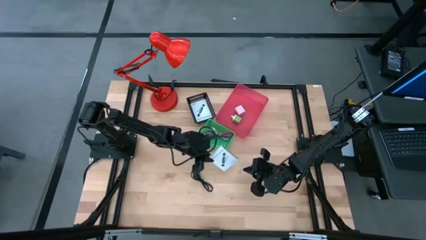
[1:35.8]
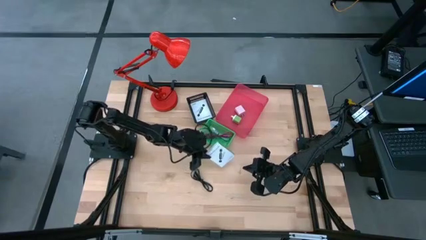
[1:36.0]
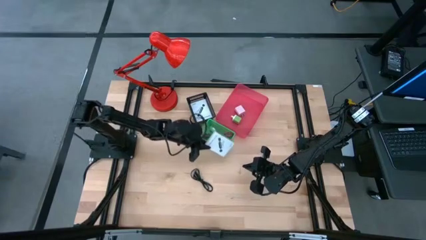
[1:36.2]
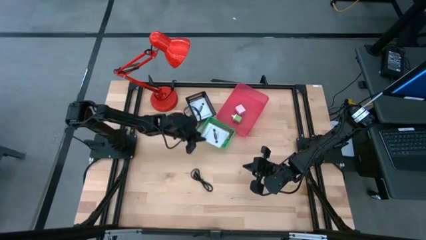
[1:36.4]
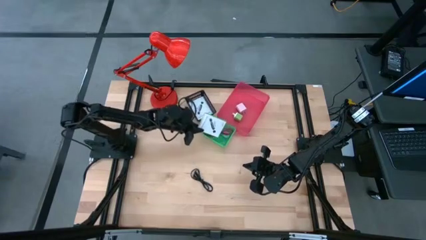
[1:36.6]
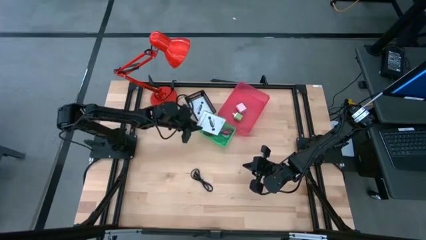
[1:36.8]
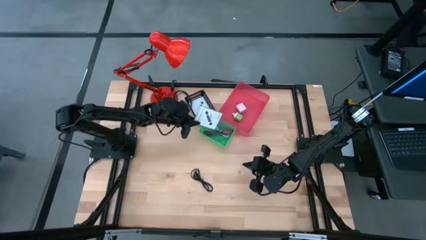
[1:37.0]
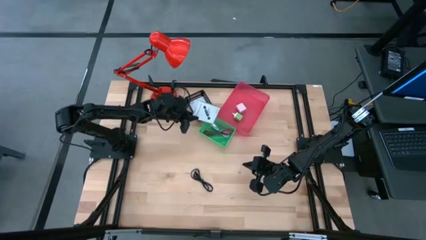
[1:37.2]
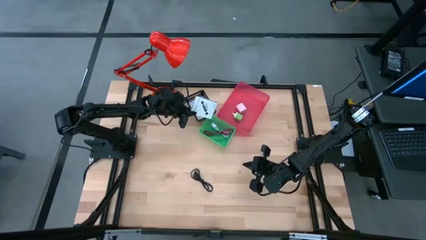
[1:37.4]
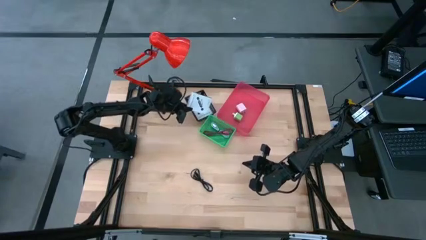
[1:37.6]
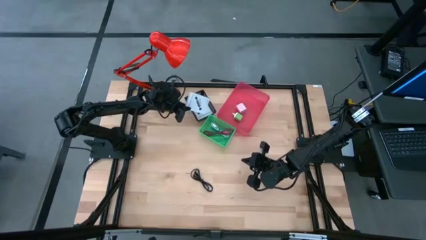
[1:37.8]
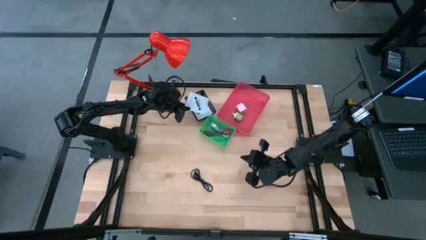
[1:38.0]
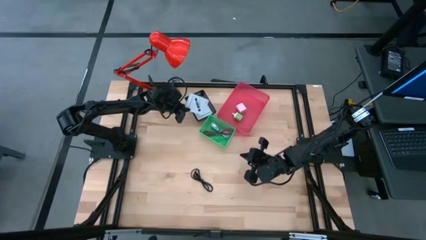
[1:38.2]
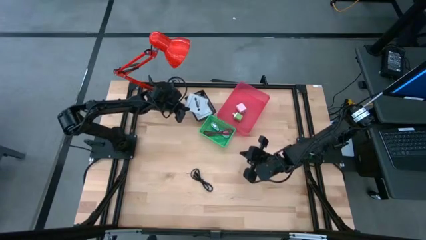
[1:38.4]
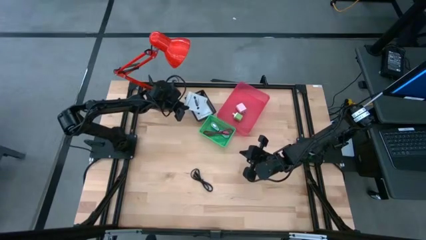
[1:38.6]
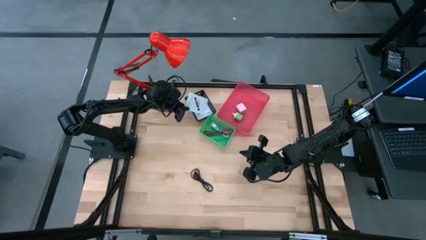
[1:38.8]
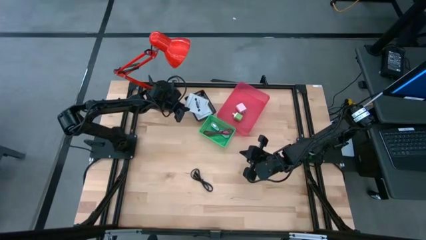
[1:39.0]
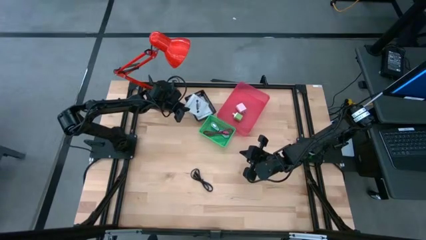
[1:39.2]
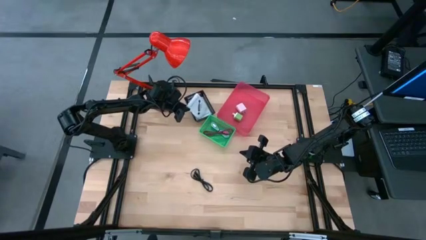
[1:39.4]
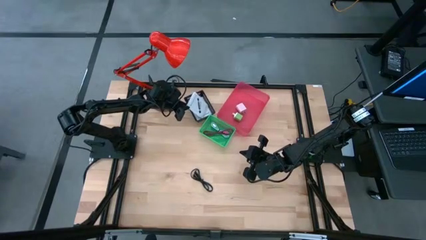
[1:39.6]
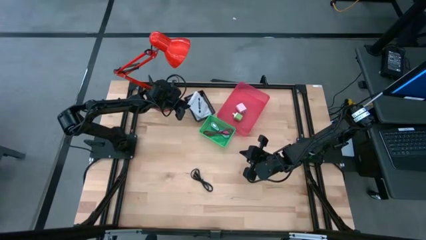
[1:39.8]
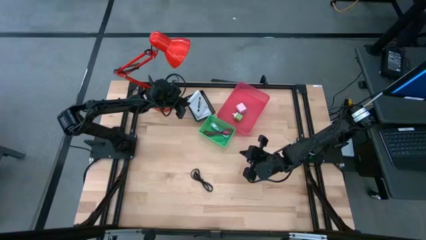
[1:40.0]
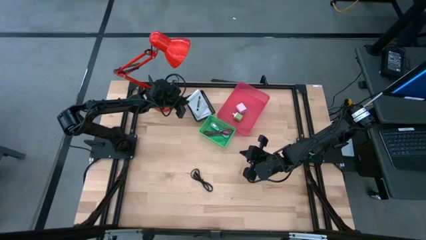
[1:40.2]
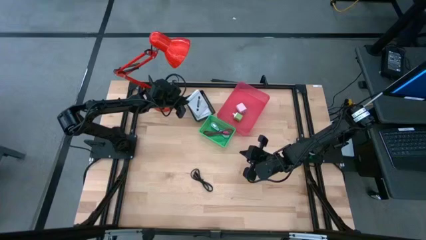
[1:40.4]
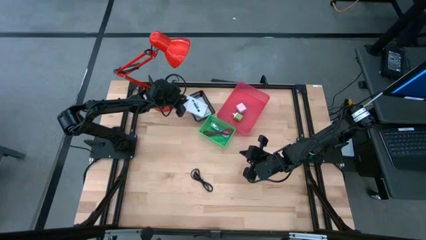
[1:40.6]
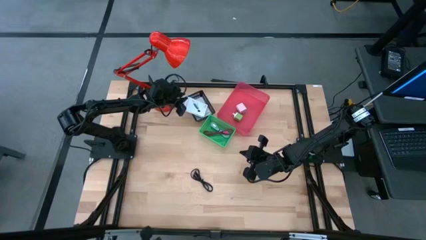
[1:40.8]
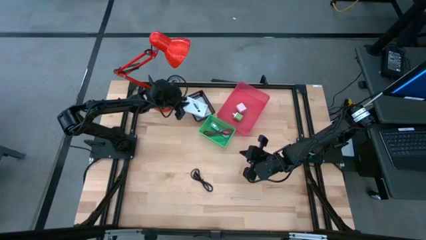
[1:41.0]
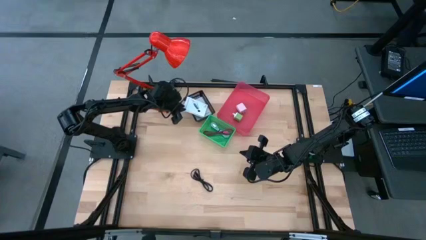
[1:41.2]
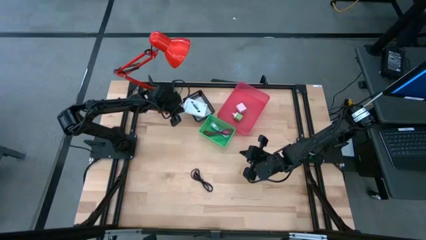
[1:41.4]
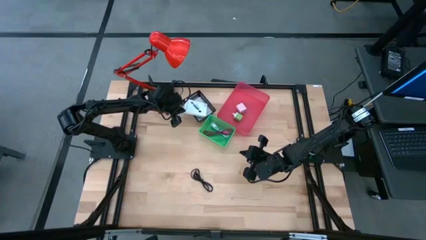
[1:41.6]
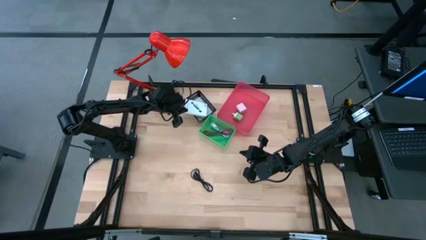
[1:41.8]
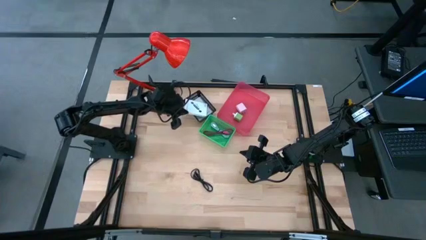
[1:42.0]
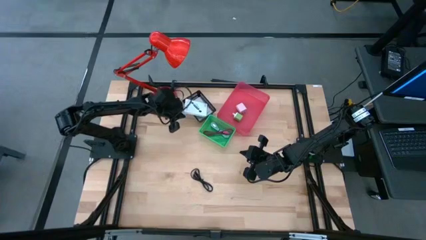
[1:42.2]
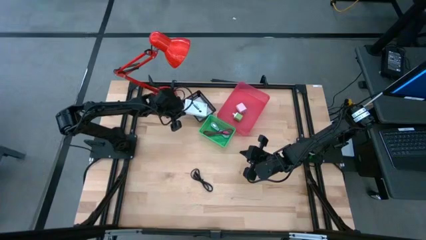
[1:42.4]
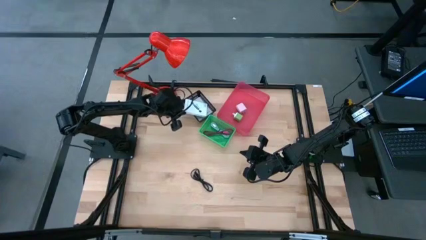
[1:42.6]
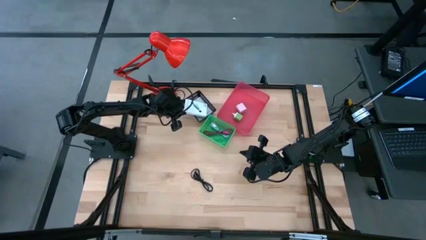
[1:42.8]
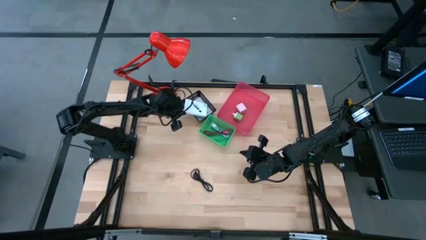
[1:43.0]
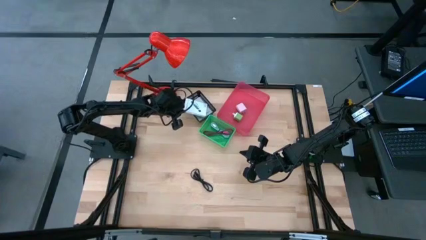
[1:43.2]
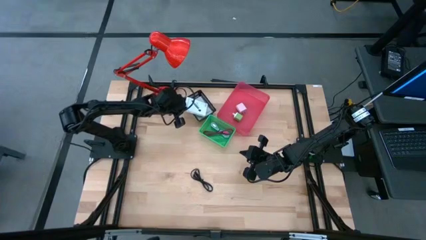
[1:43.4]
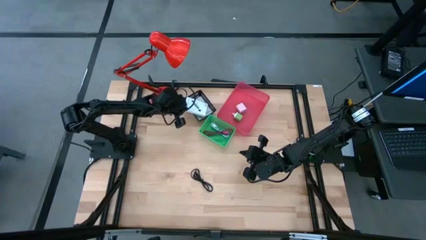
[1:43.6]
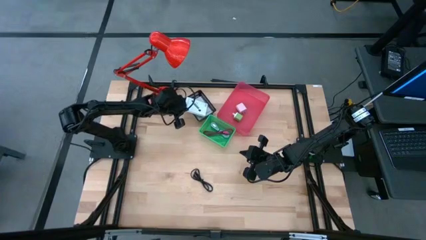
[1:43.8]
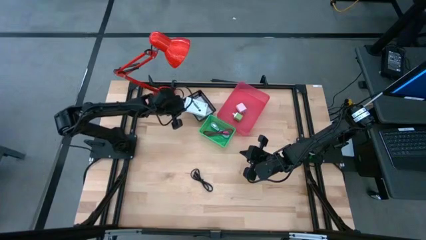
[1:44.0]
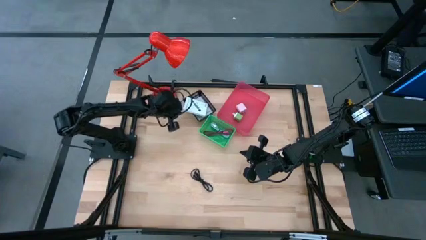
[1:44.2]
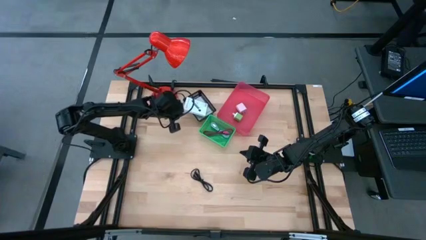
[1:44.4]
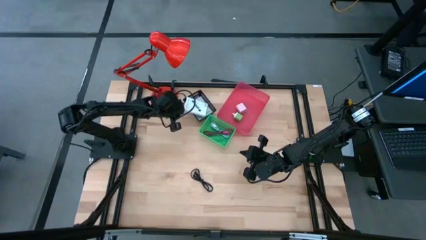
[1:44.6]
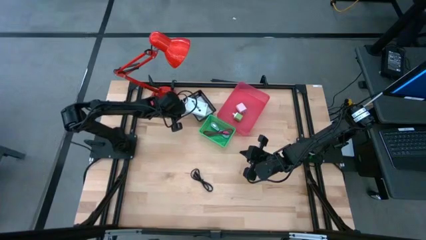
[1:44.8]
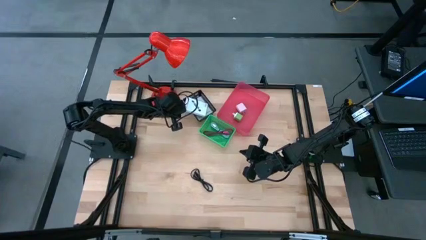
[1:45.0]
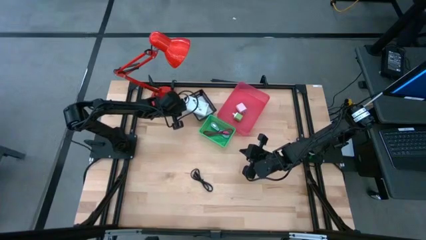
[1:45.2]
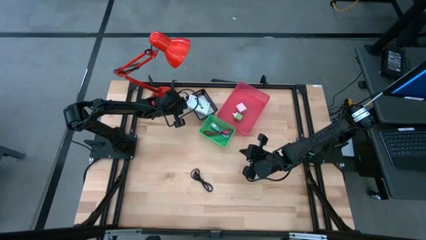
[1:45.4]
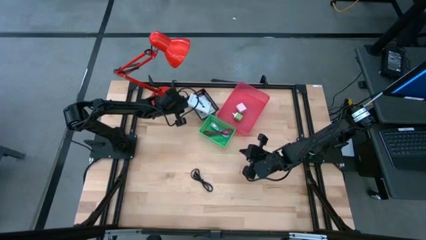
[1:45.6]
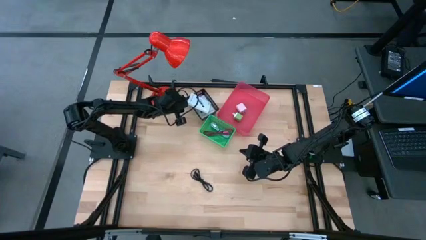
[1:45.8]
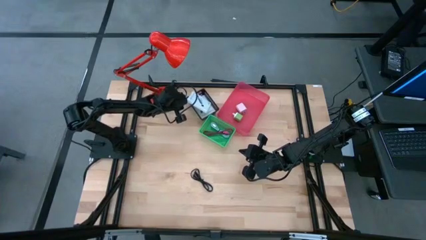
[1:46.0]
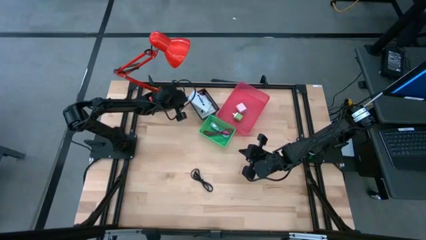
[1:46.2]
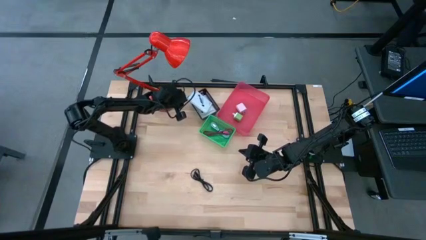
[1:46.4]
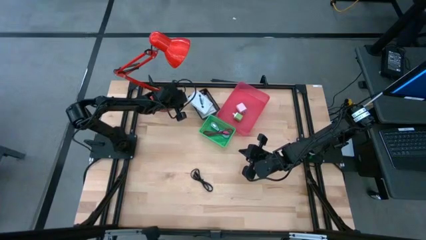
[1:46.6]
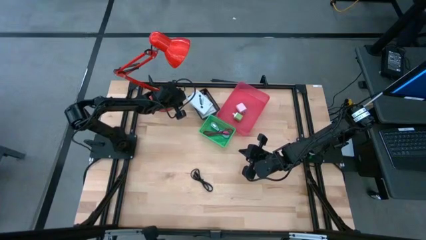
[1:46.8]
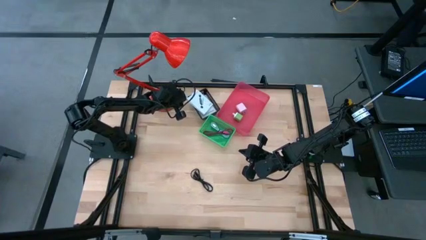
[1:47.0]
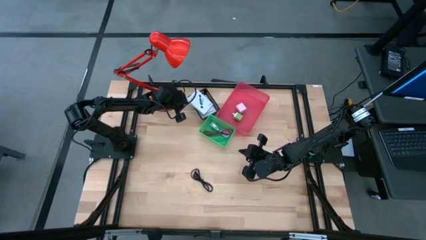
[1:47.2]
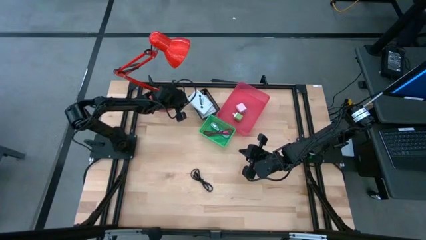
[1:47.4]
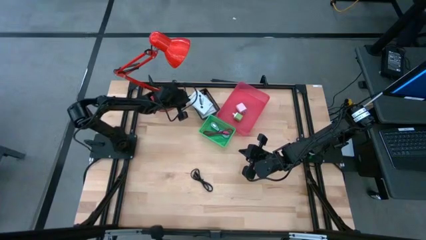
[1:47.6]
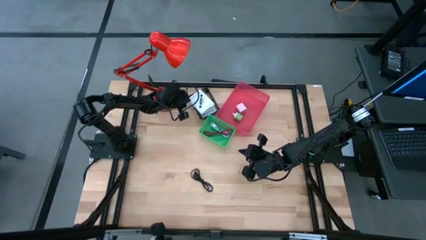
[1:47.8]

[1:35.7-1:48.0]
Task: Pick and place items into bin
Put the card reader box into the black bin

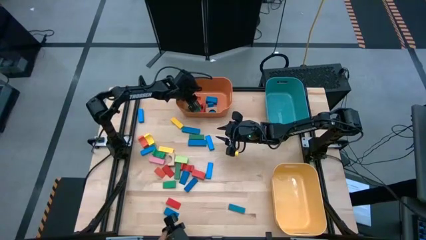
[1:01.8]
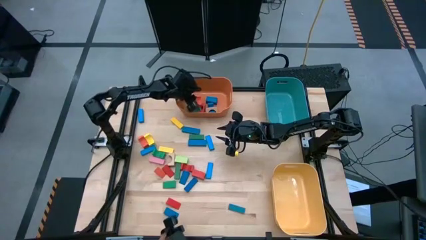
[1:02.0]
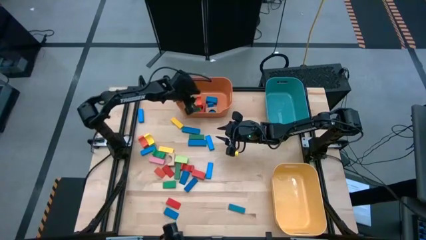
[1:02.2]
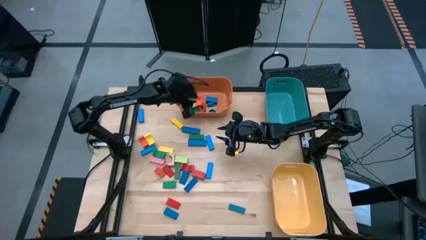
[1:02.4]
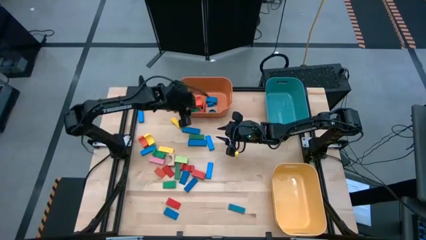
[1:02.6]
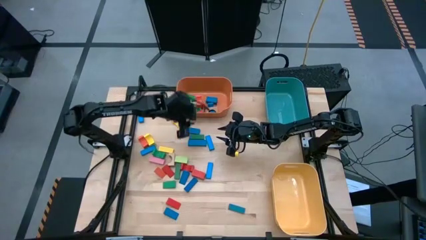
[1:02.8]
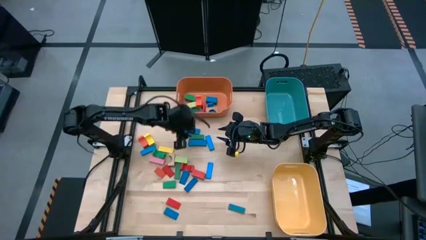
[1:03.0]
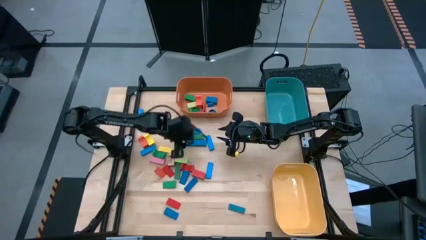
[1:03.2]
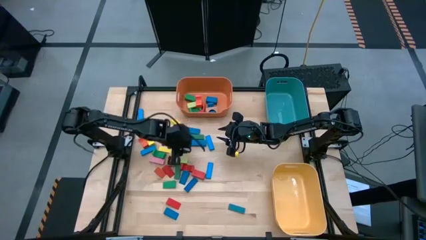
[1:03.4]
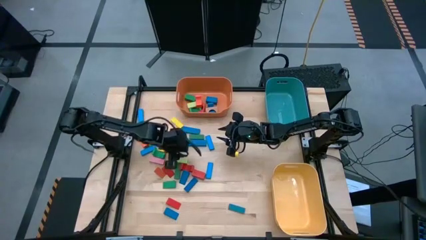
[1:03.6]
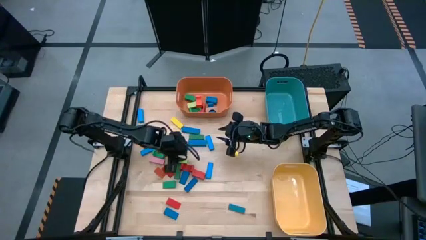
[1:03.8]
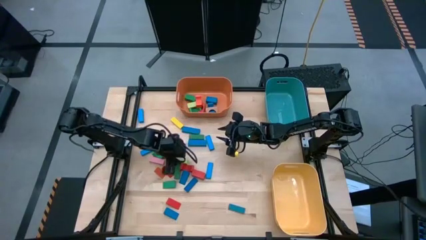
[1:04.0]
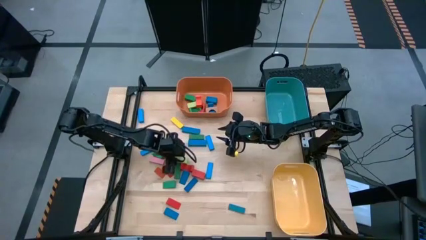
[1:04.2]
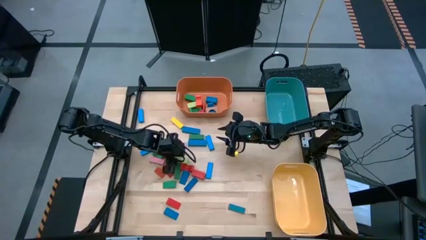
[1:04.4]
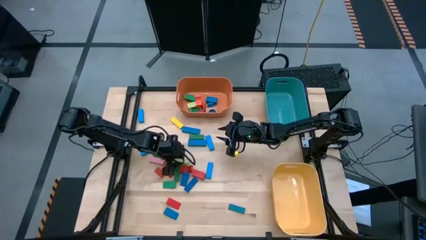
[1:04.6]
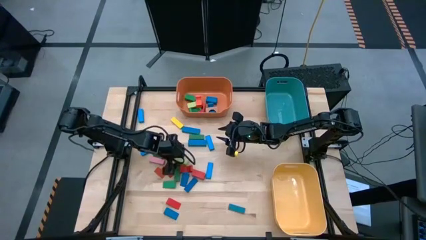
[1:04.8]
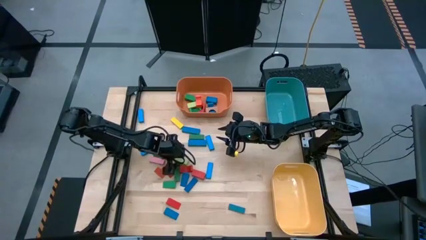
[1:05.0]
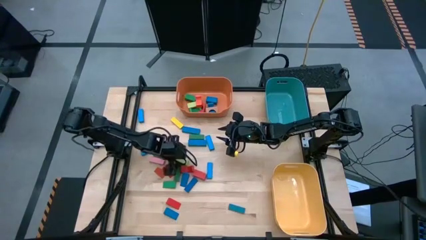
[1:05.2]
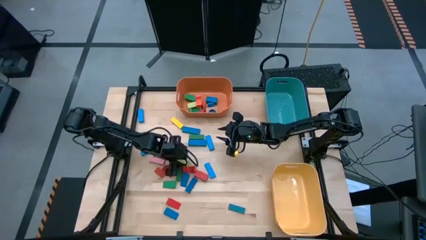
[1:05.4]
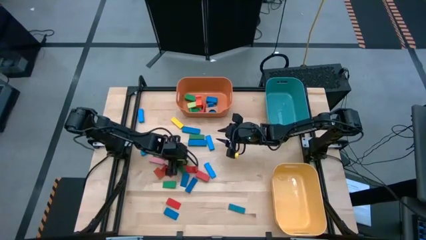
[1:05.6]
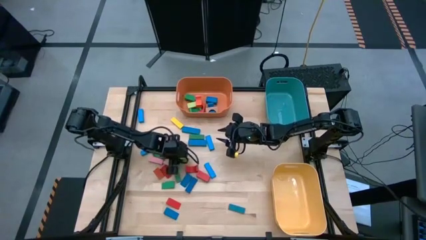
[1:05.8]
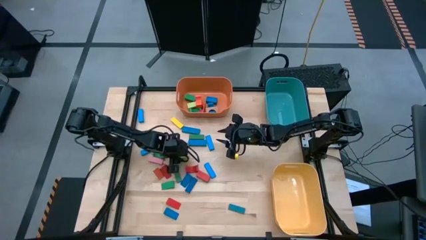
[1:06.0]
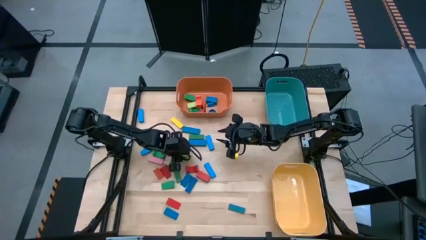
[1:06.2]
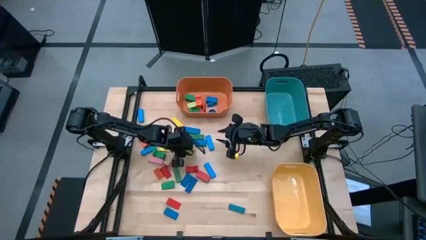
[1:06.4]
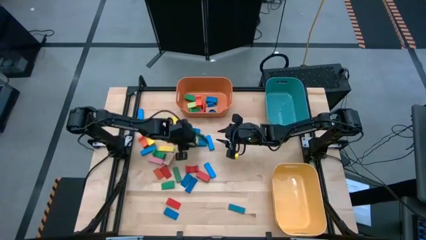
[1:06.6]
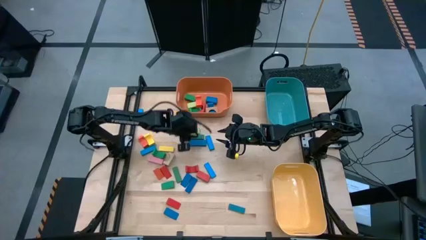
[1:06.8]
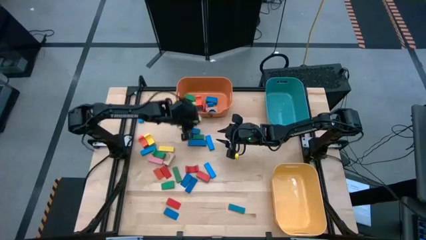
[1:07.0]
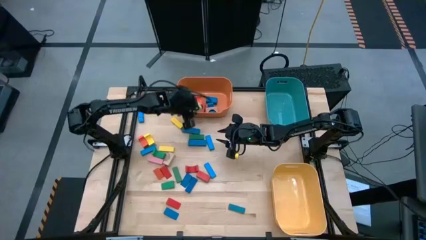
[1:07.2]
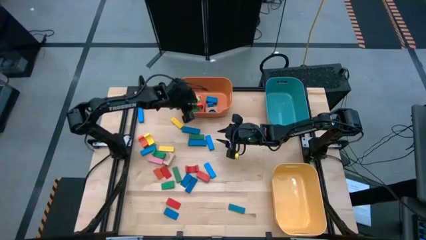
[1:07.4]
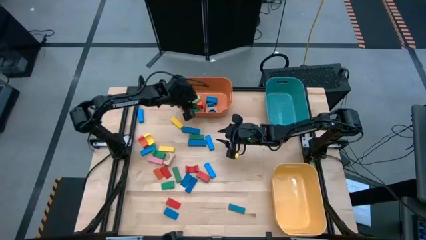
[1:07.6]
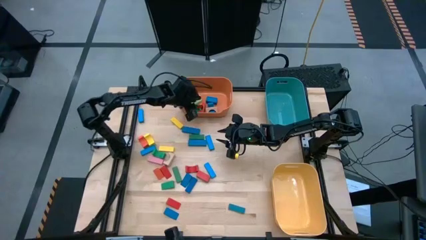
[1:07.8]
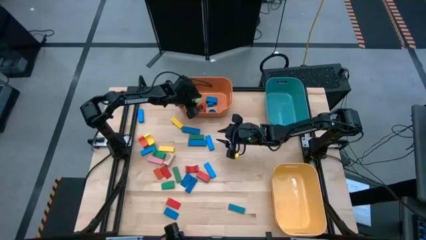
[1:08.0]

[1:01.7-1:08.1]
Task: Sort blocks by size
Put the light green arch block into the orange bin
